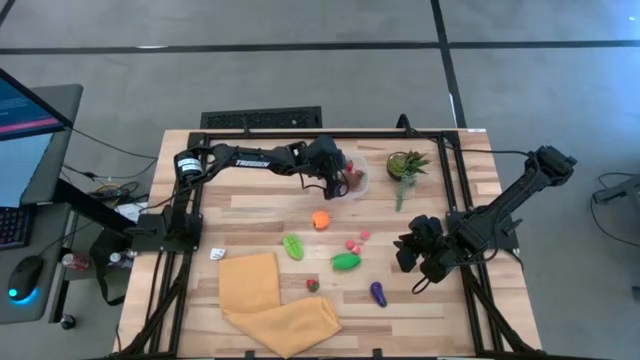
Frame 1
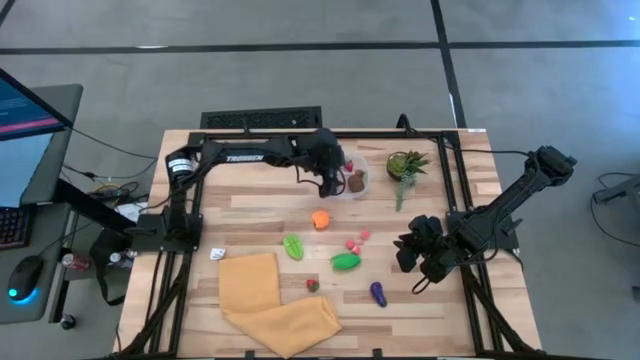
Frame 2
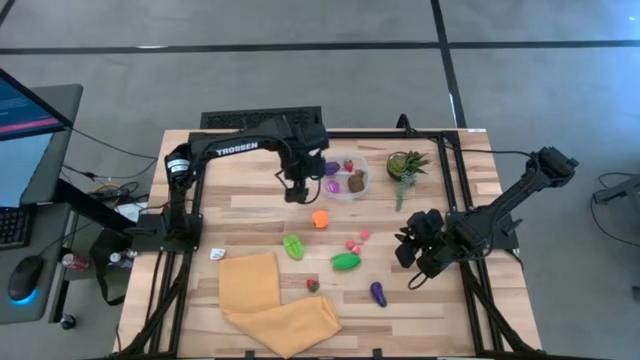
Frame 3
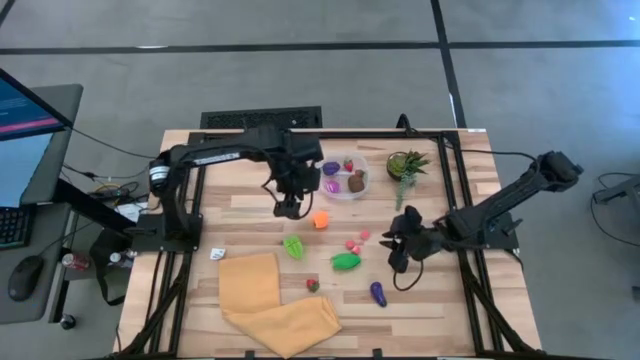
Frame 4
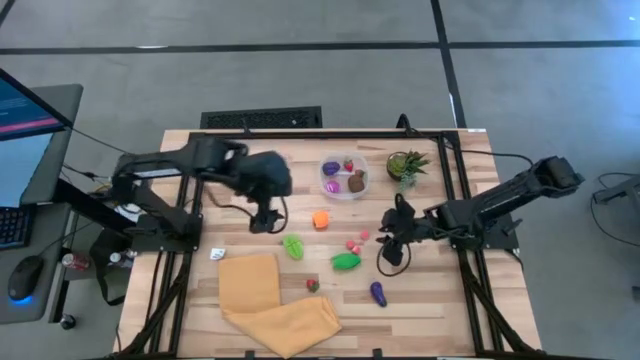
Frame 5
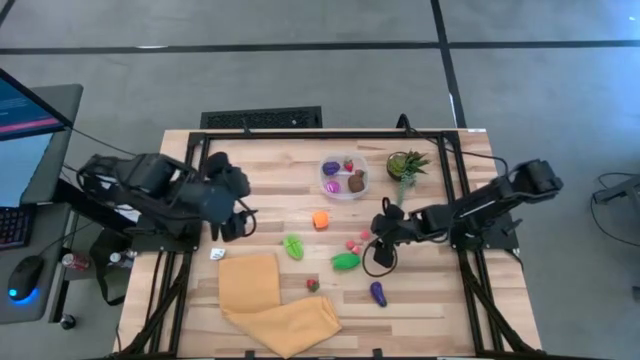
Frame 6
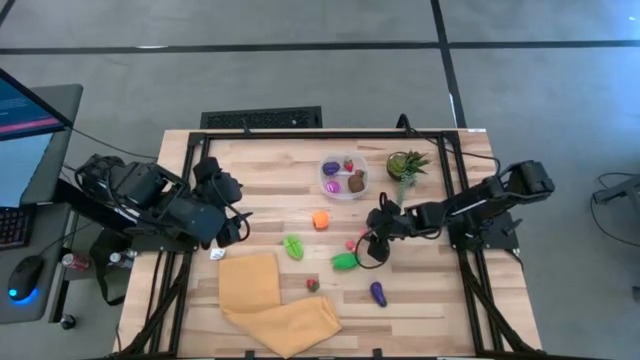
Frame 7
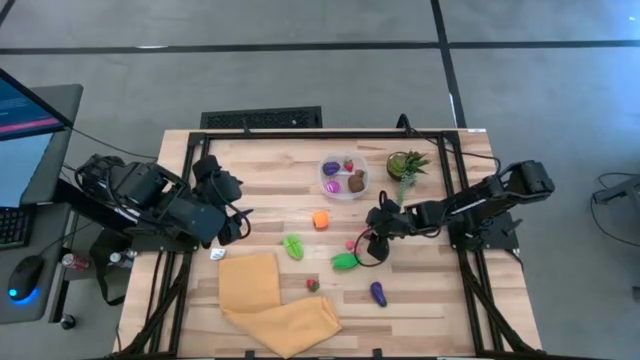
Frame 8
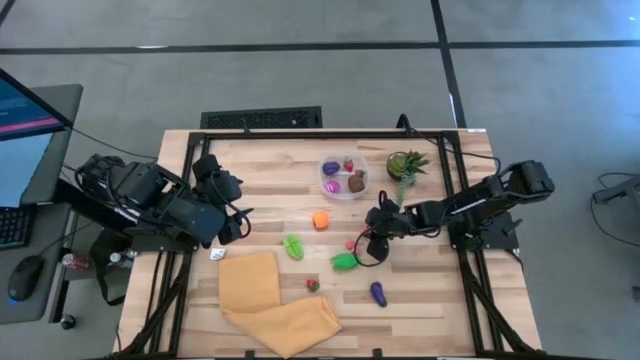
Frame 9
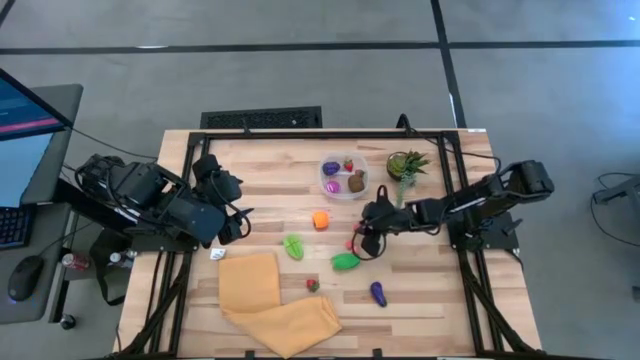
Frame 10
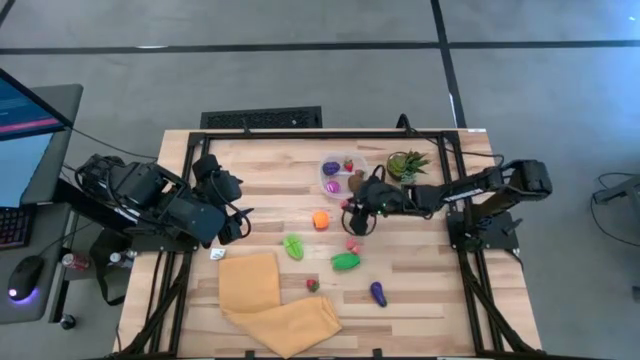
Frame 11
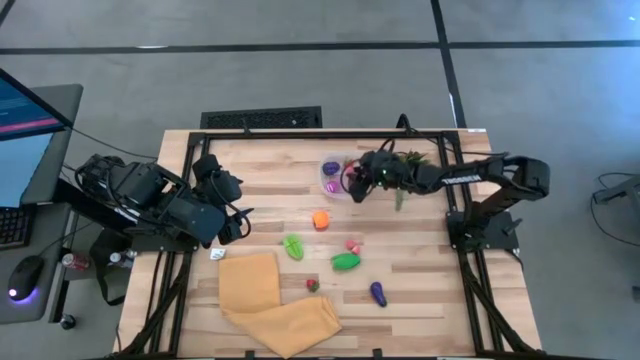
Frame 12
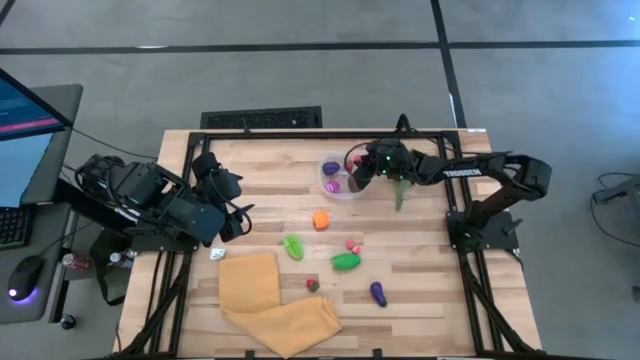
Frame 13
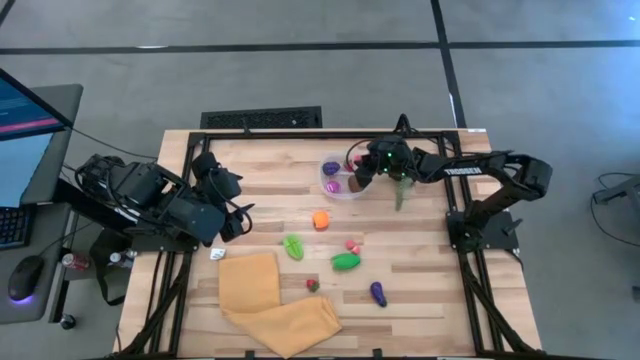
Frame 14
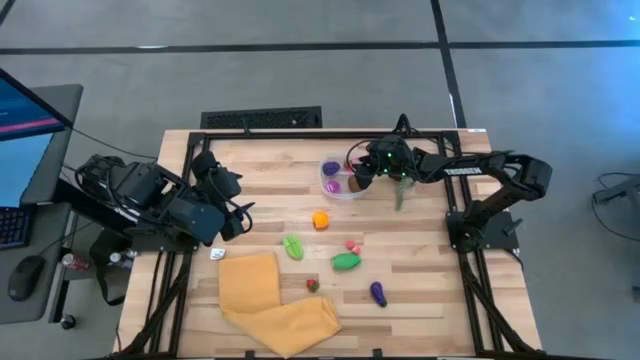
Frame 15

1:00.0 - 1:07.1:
Task: Pick and placing Produce into tupperware
Put the top peach in the transparent bin

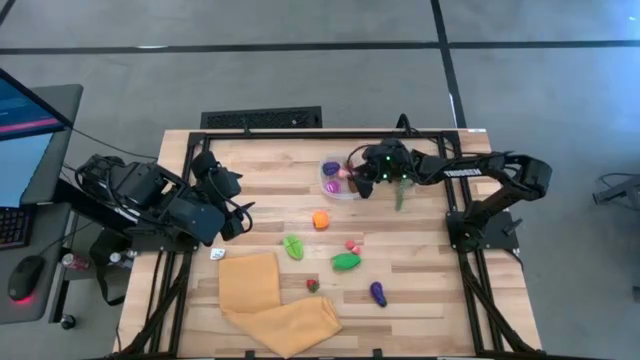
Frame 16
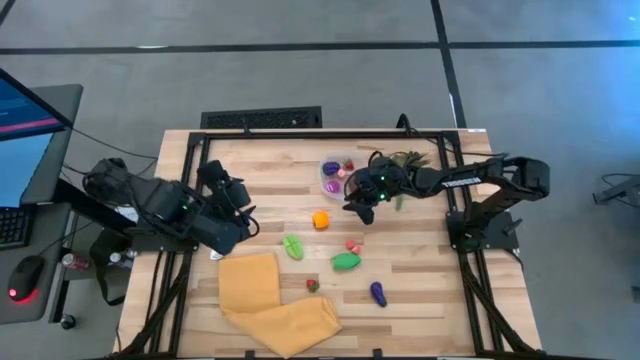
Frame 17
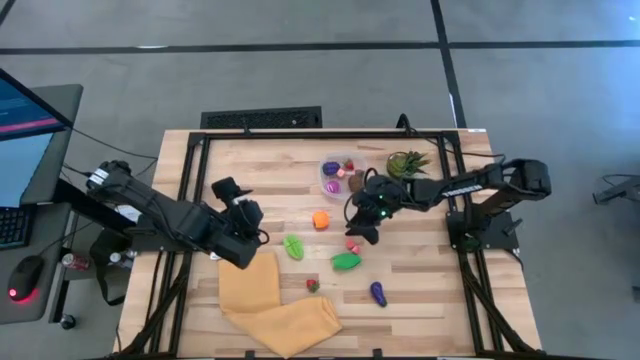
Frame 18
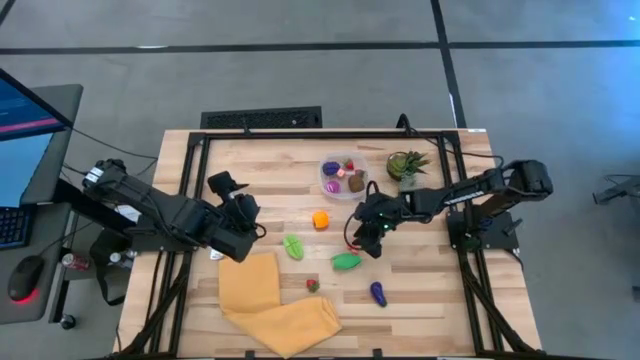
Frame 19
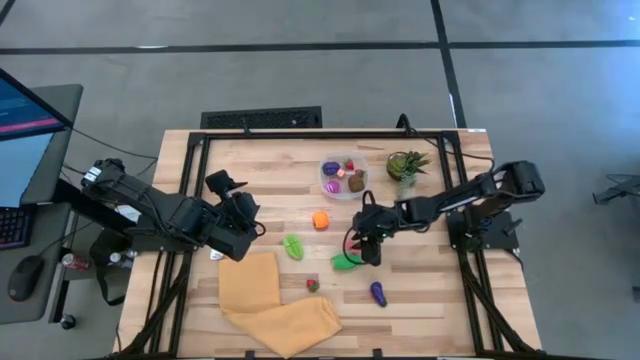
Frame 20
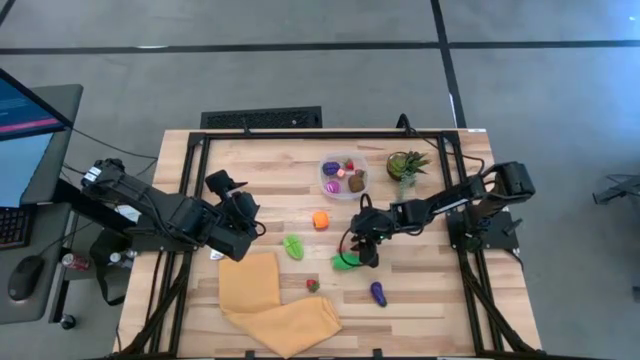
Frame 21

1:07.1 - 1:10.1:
Put the right peach in the transparent bin

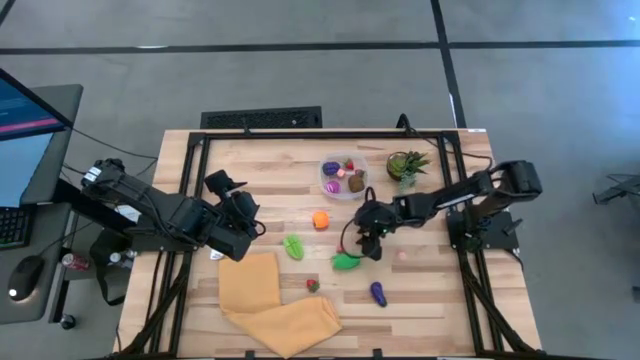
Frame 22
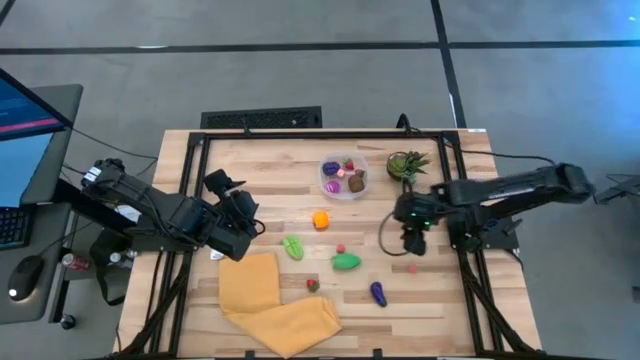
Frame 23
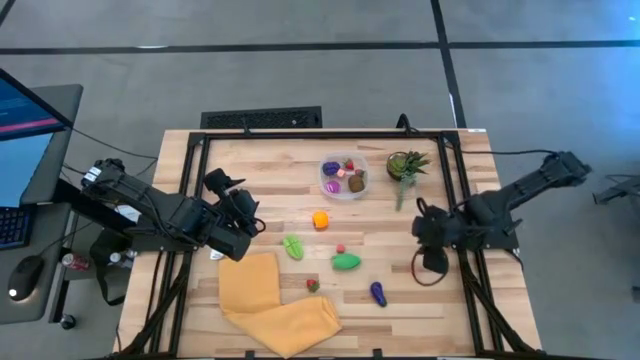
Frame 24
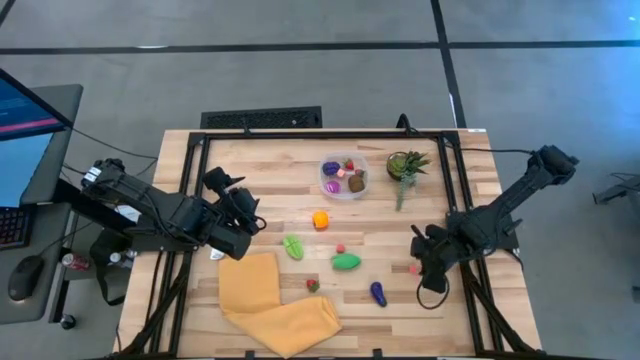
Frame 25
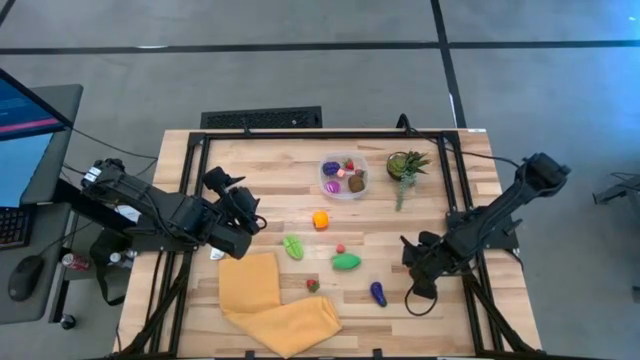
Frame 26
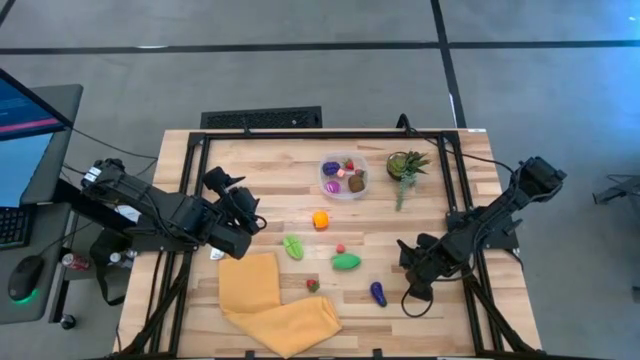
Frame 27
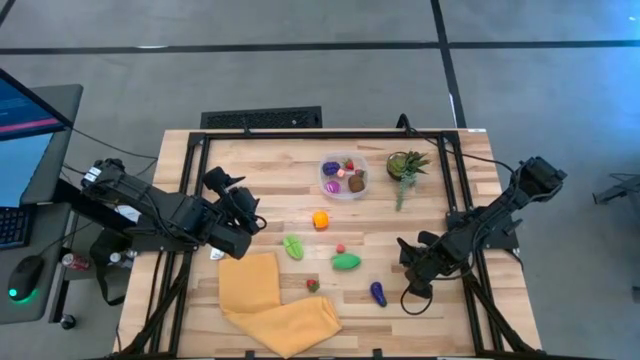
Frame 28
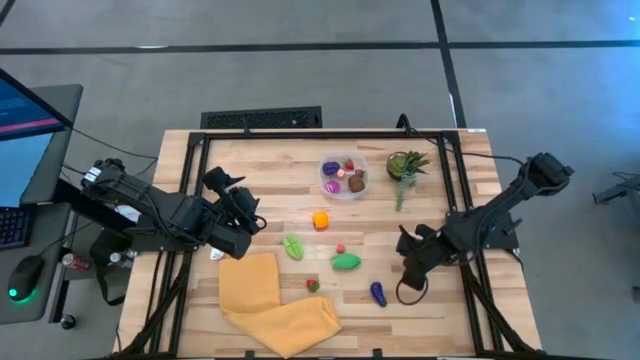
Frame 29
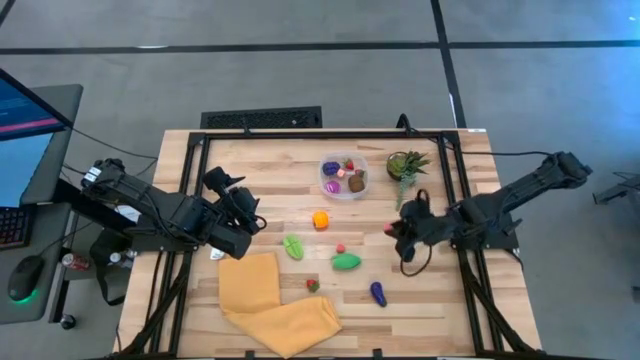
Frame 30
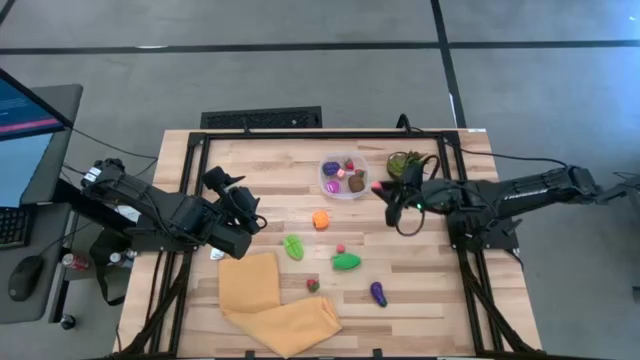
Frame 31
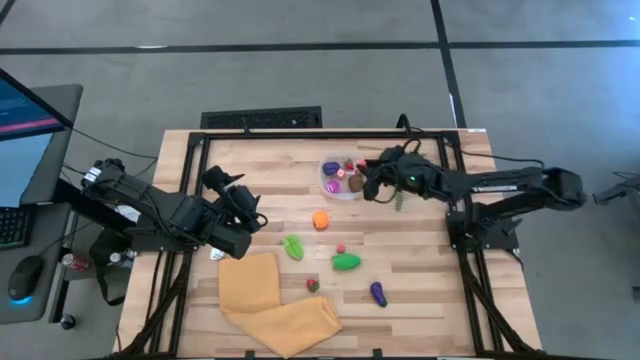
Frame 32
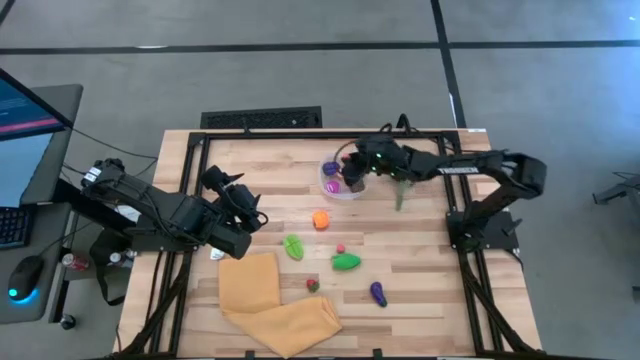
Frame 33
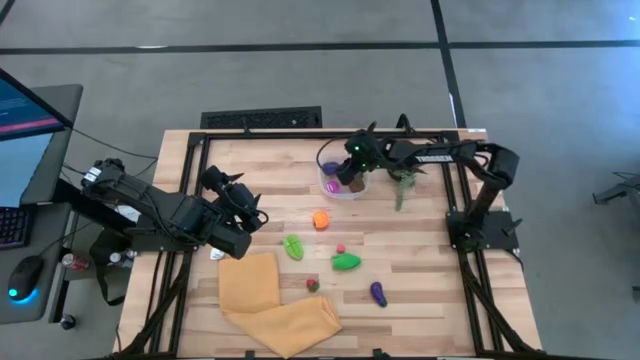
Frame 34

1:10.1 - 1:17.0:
Put the right peach in the transparent bin

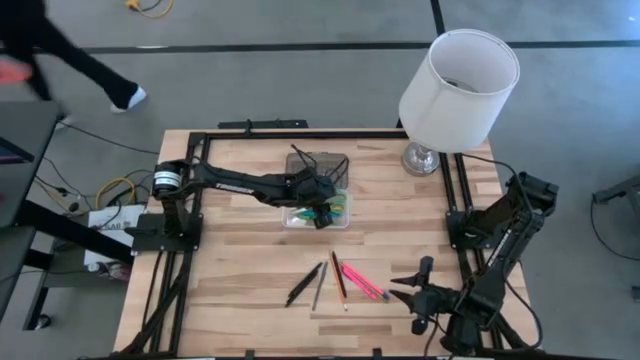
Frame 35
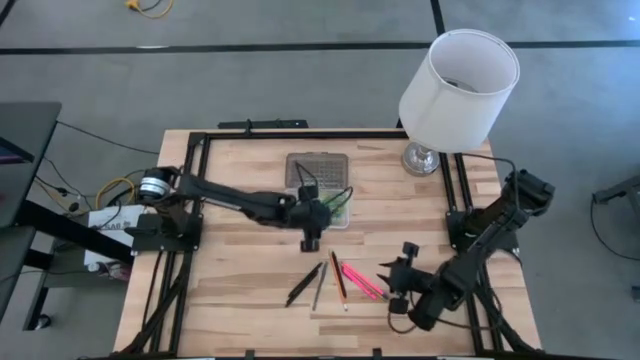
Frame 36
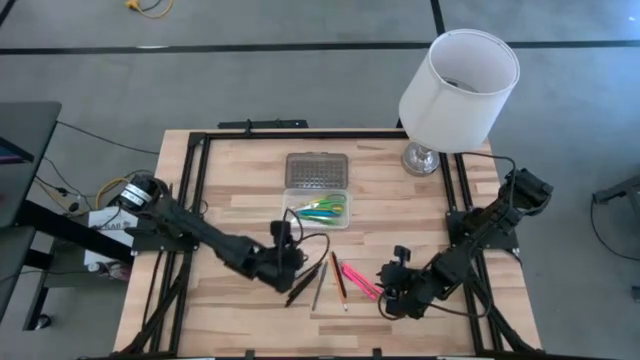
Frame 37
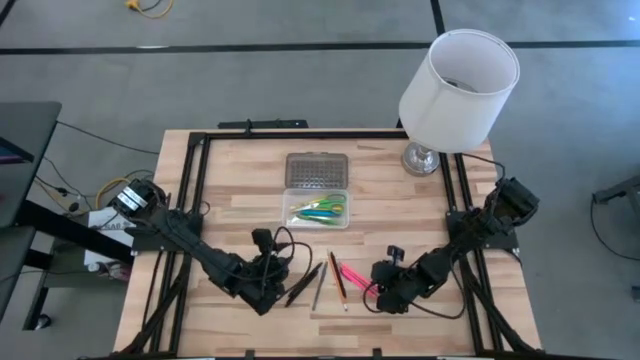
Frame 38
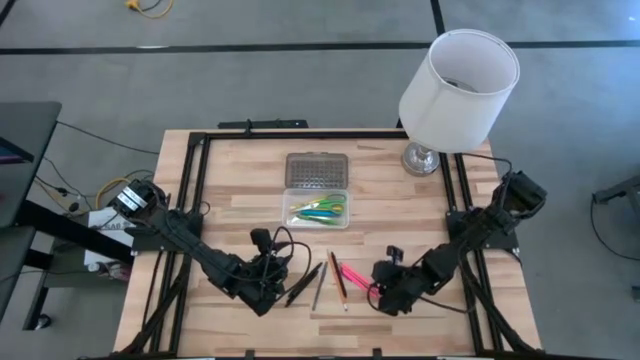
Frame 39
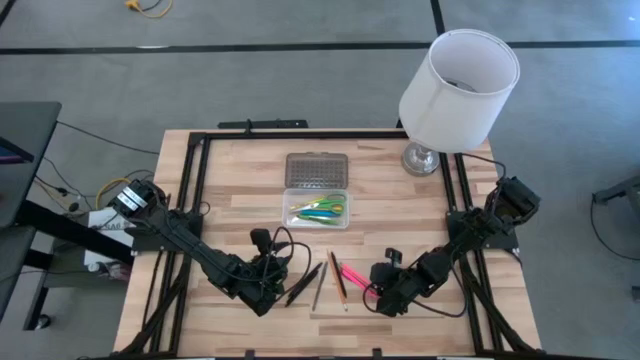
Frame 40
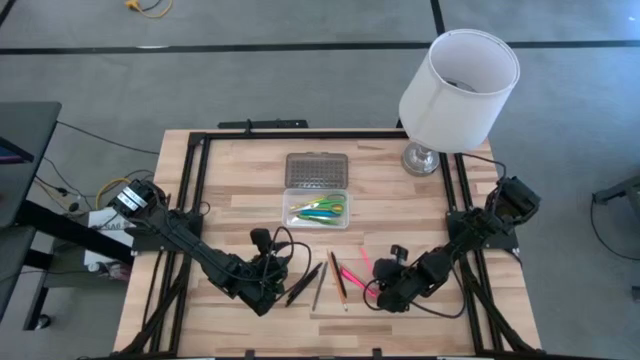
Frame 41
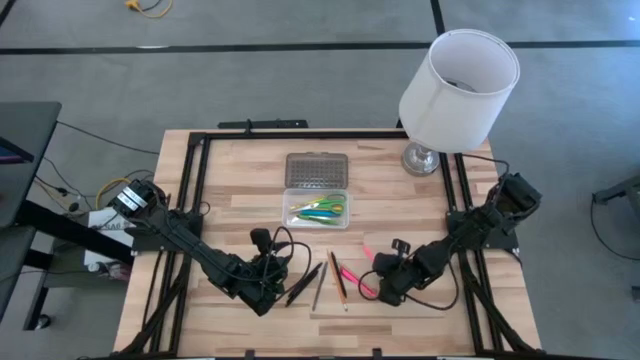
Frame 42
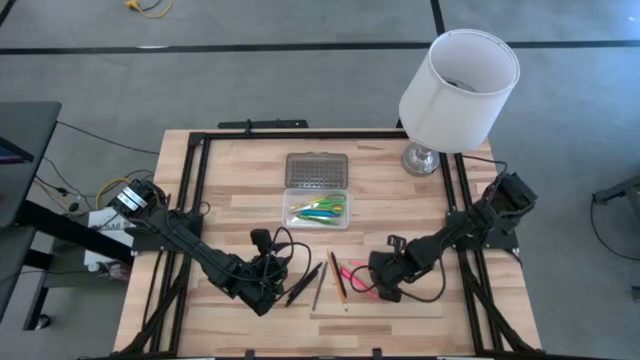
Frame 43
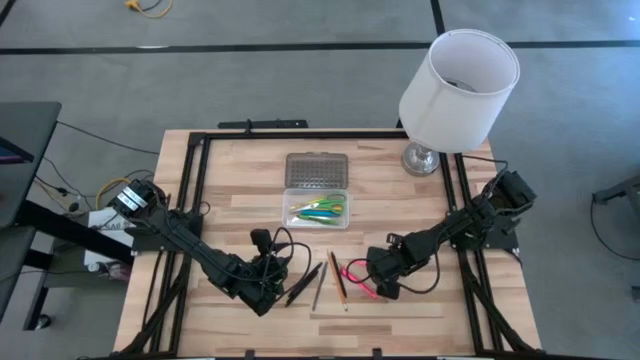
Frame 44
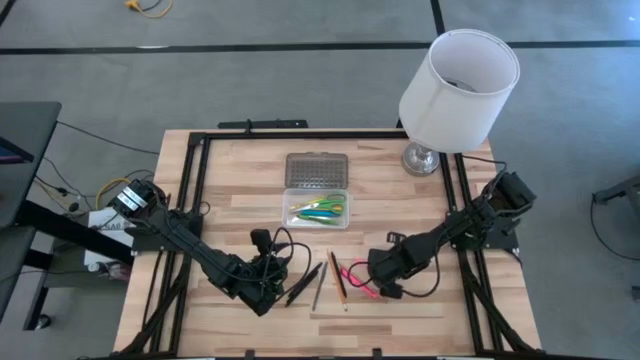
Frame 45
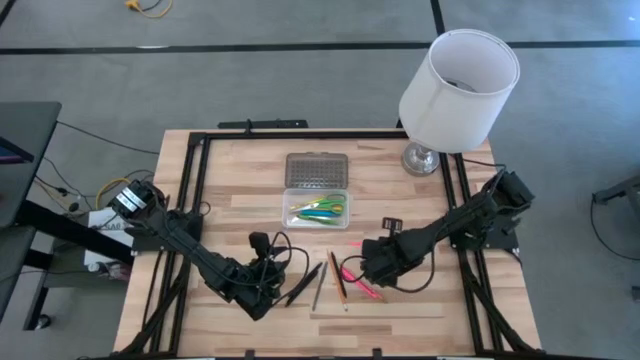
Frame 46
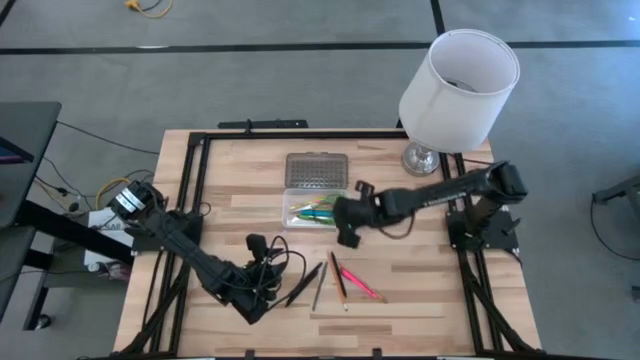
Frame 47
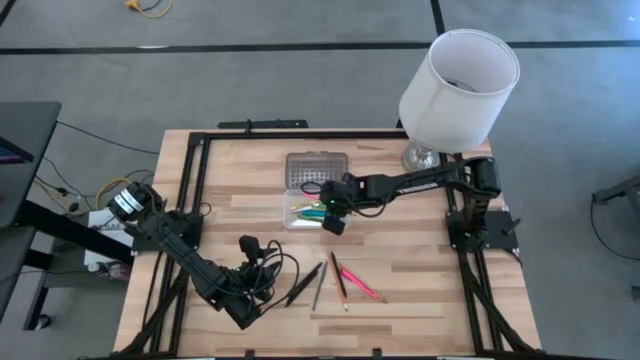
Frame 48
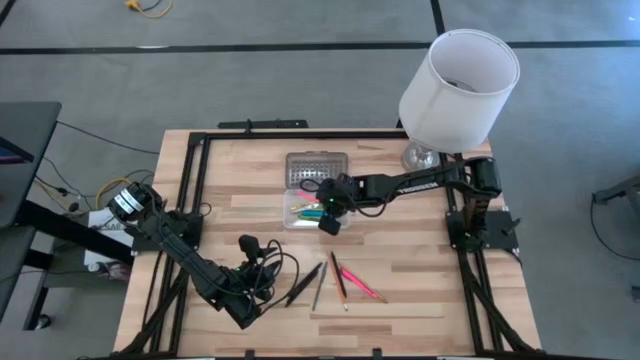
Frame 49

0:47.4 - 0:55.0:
Task: Pick & place school supplies into a supply box
Put the pink pencil into the black supply box
